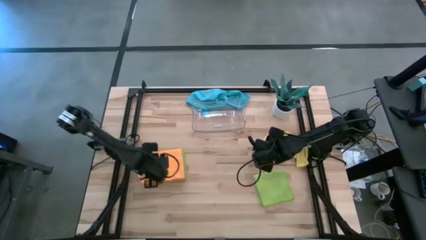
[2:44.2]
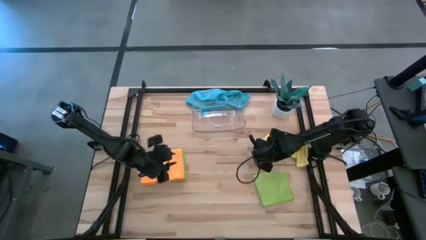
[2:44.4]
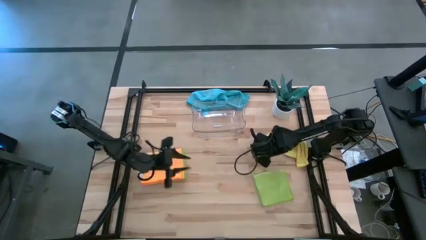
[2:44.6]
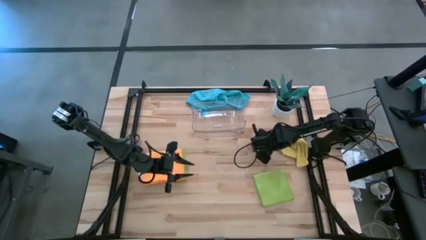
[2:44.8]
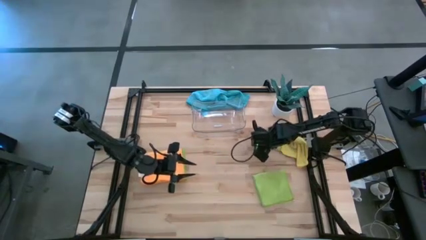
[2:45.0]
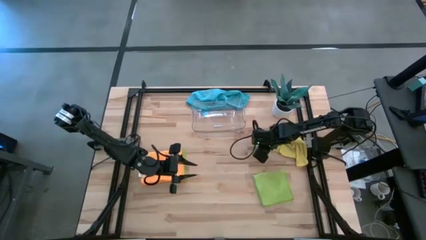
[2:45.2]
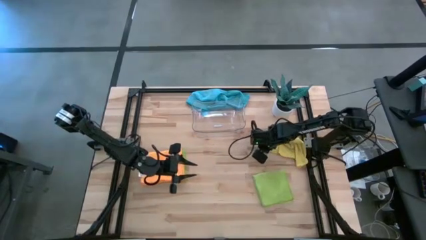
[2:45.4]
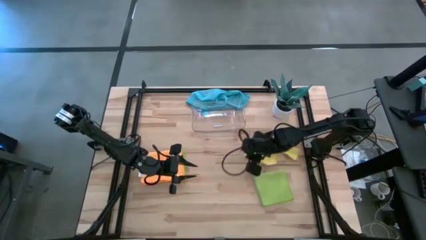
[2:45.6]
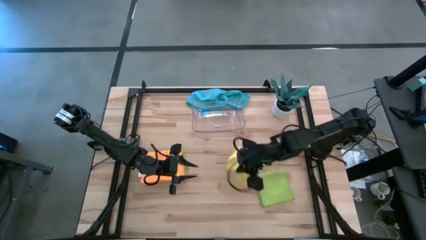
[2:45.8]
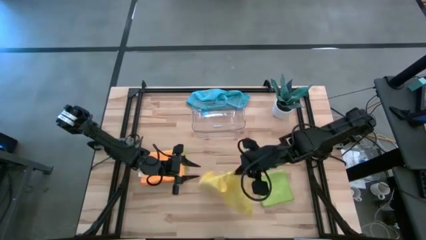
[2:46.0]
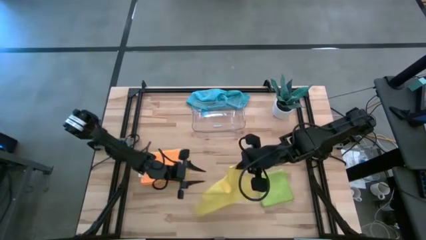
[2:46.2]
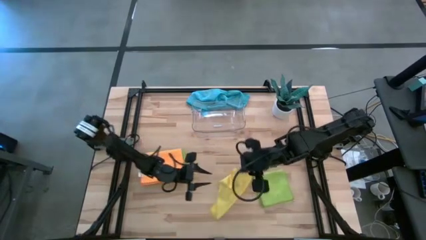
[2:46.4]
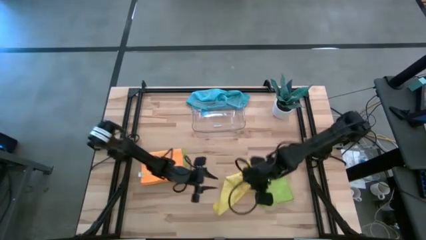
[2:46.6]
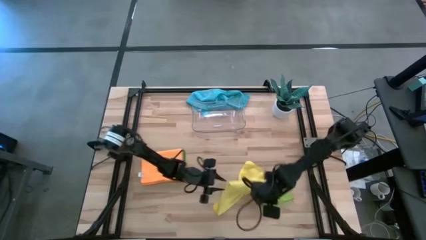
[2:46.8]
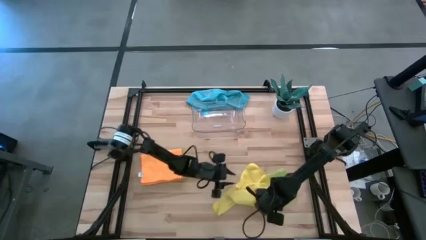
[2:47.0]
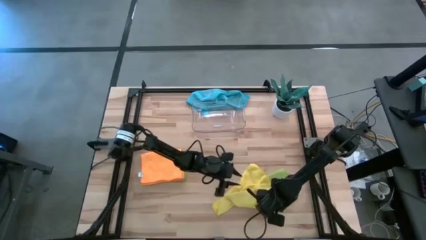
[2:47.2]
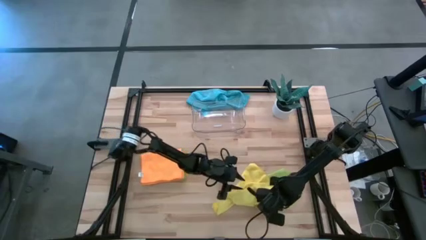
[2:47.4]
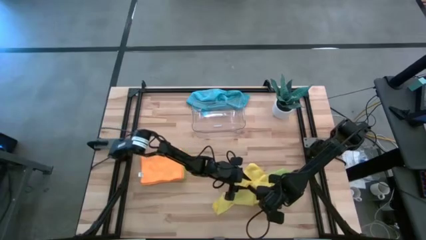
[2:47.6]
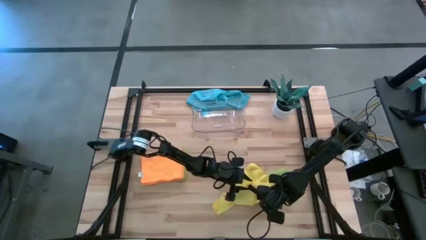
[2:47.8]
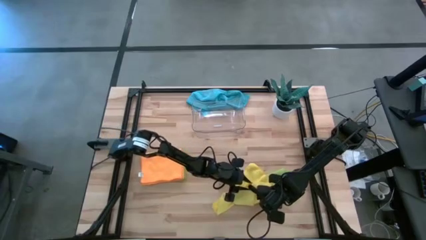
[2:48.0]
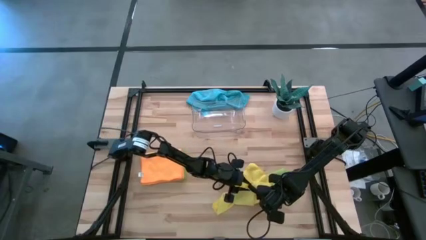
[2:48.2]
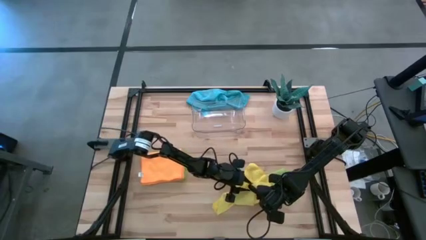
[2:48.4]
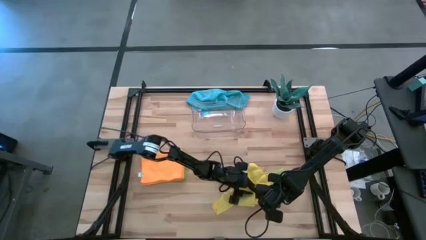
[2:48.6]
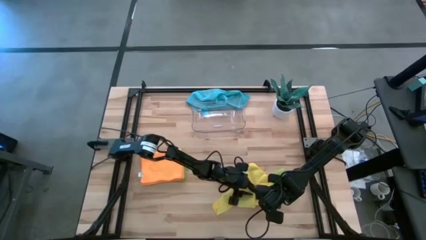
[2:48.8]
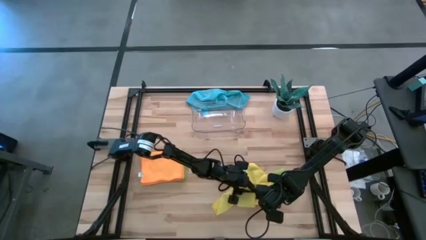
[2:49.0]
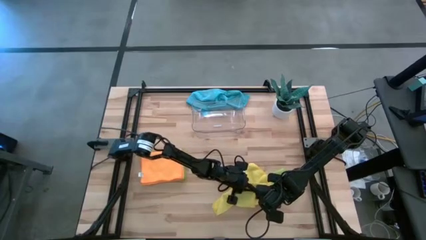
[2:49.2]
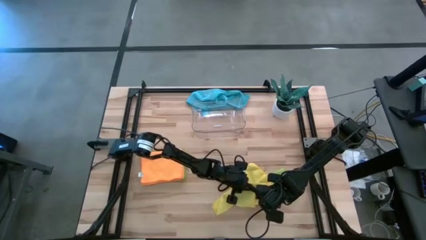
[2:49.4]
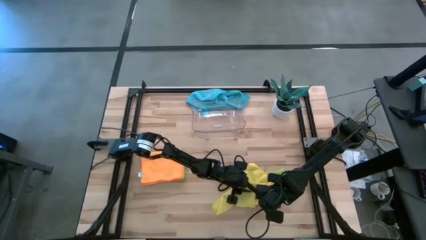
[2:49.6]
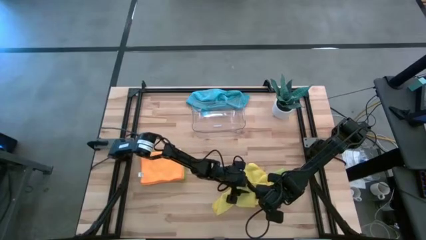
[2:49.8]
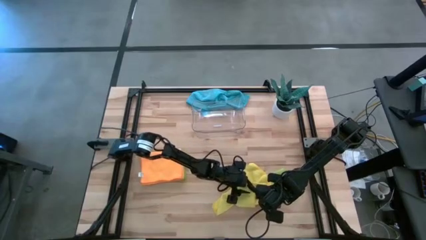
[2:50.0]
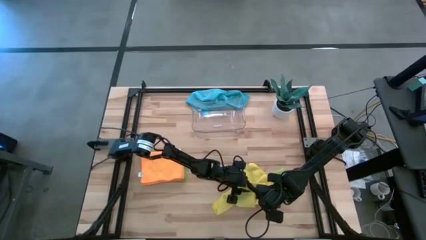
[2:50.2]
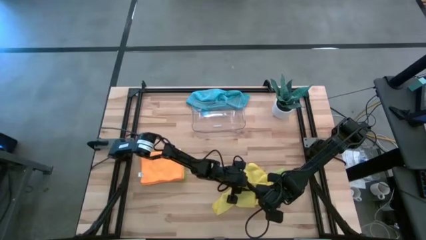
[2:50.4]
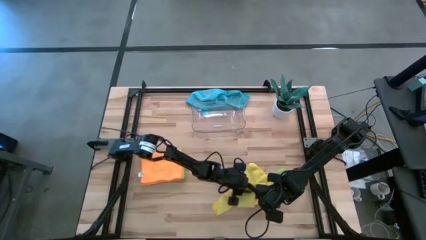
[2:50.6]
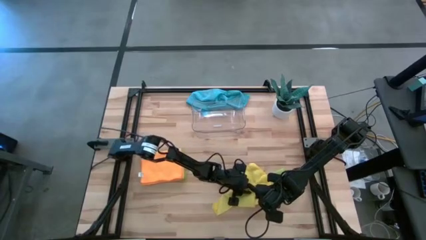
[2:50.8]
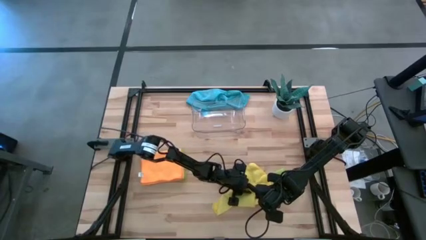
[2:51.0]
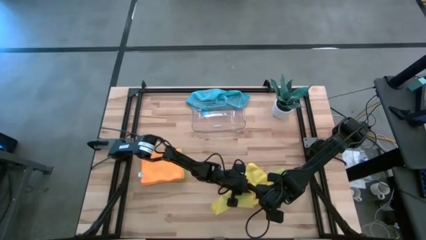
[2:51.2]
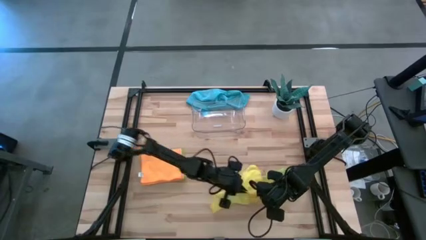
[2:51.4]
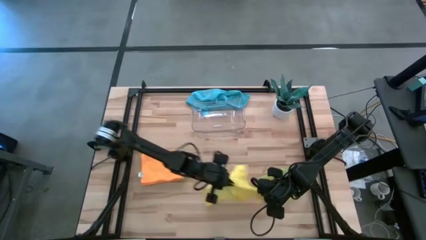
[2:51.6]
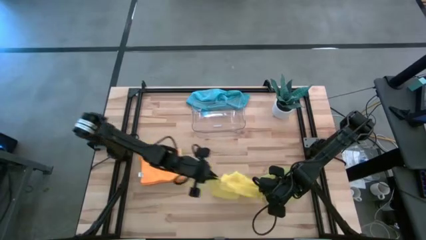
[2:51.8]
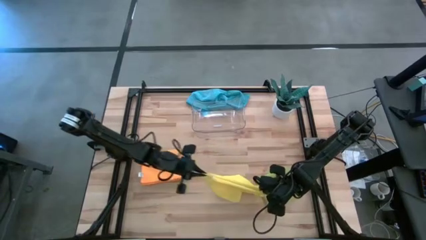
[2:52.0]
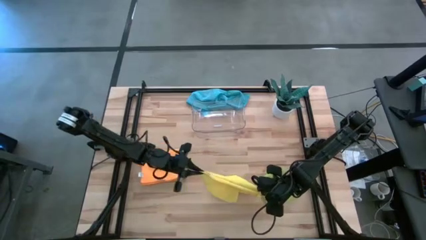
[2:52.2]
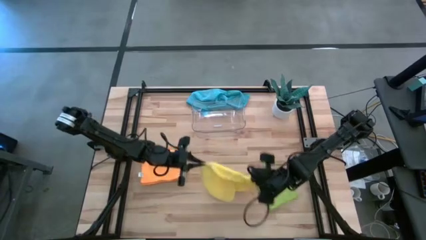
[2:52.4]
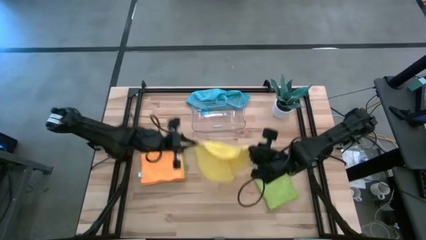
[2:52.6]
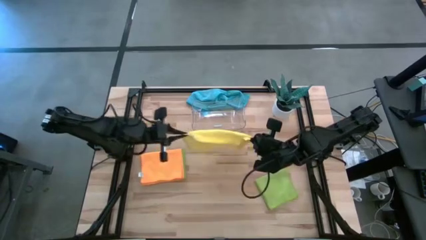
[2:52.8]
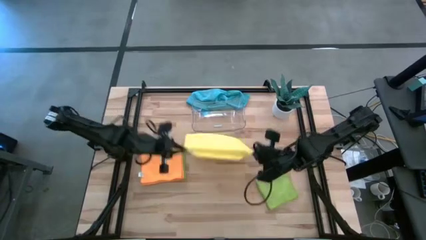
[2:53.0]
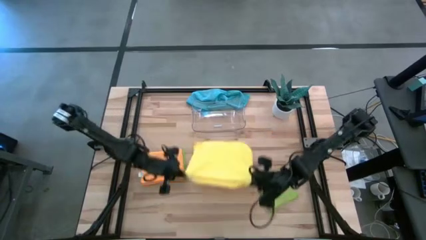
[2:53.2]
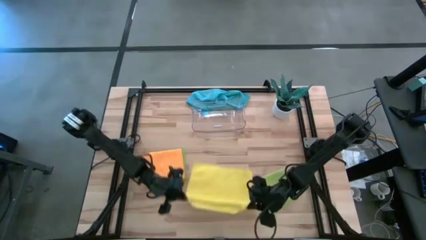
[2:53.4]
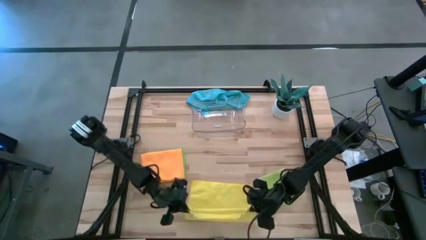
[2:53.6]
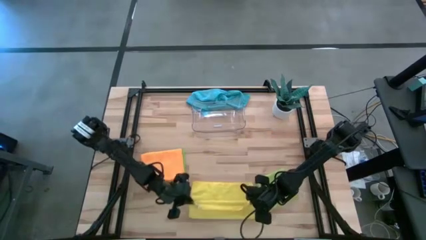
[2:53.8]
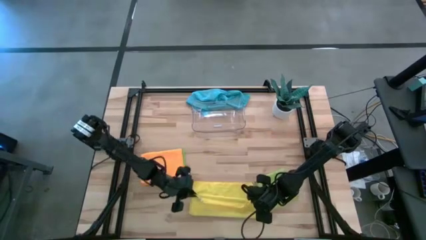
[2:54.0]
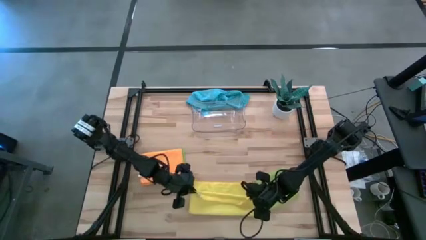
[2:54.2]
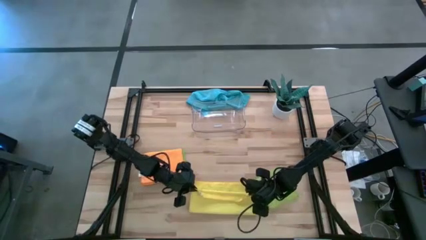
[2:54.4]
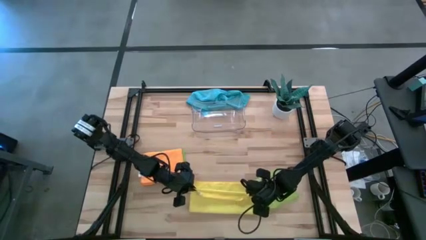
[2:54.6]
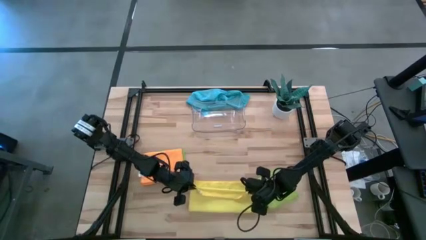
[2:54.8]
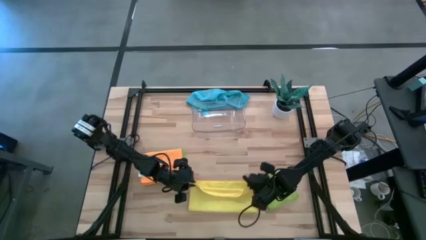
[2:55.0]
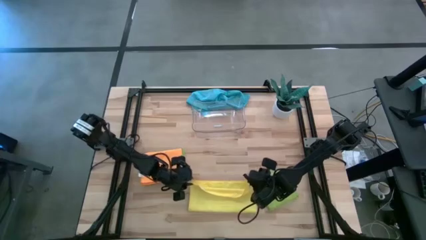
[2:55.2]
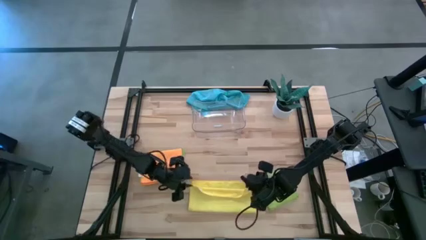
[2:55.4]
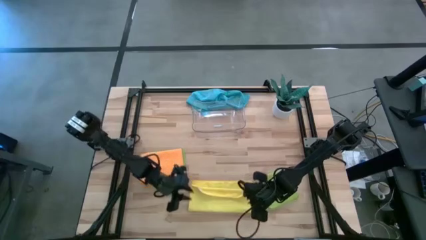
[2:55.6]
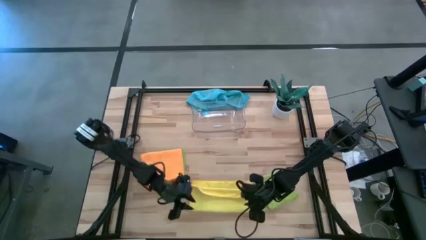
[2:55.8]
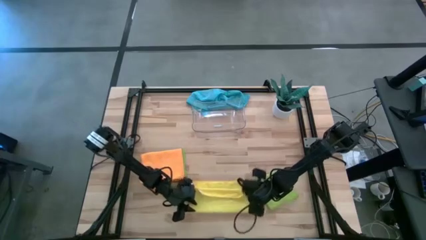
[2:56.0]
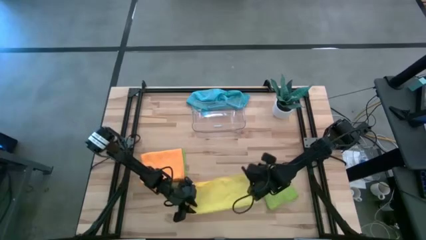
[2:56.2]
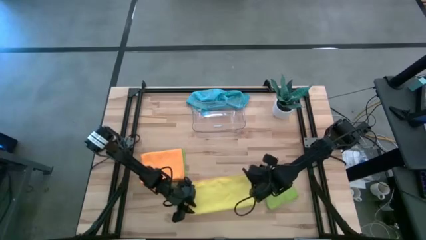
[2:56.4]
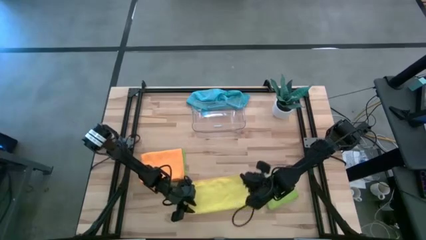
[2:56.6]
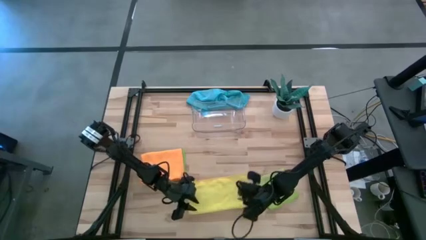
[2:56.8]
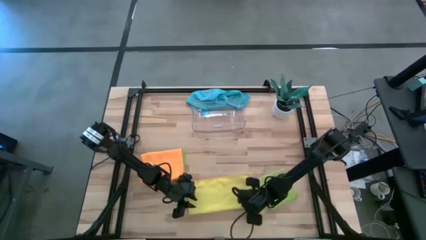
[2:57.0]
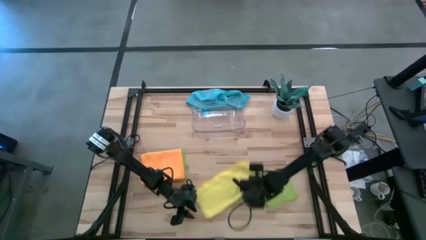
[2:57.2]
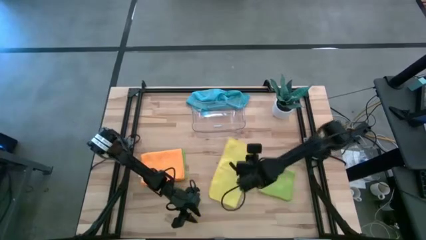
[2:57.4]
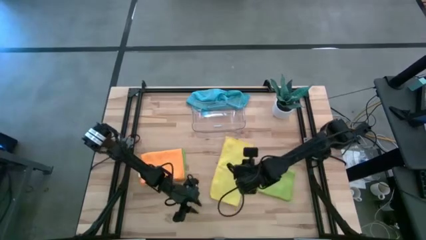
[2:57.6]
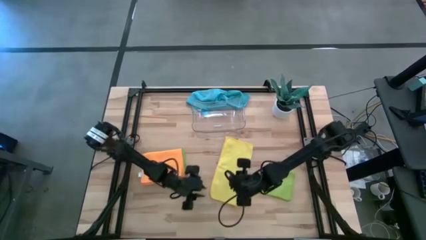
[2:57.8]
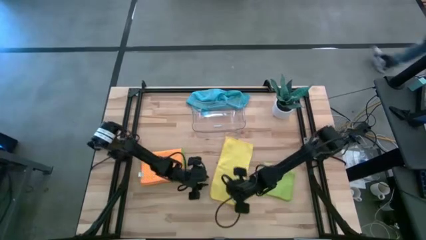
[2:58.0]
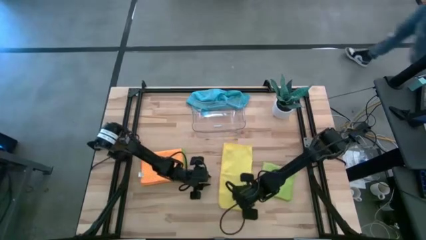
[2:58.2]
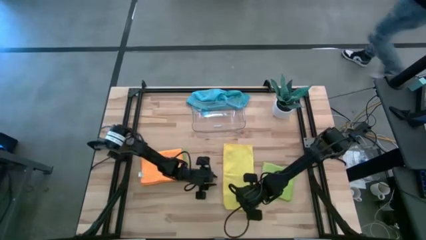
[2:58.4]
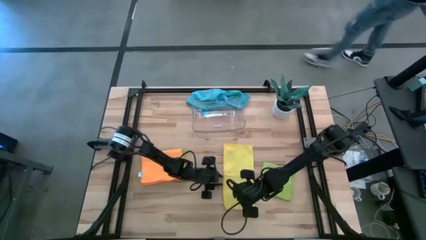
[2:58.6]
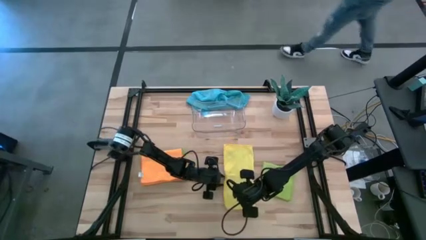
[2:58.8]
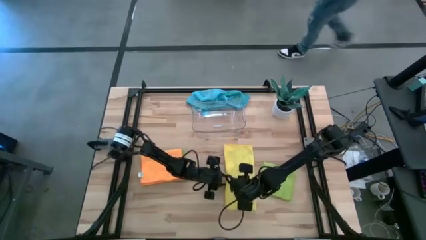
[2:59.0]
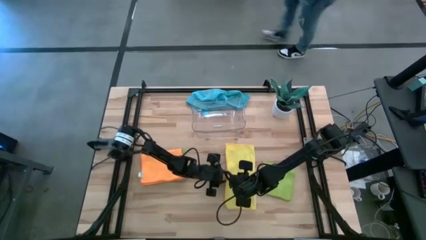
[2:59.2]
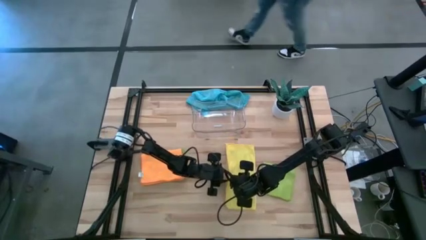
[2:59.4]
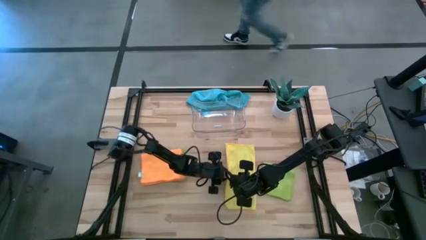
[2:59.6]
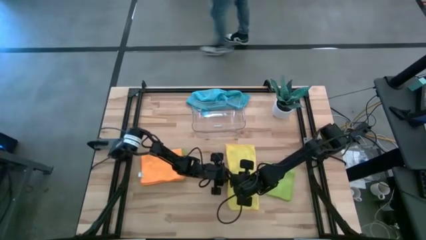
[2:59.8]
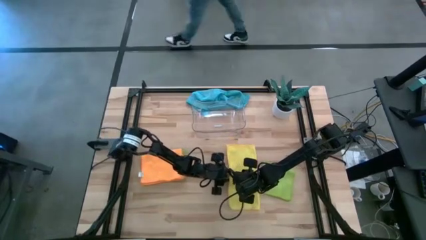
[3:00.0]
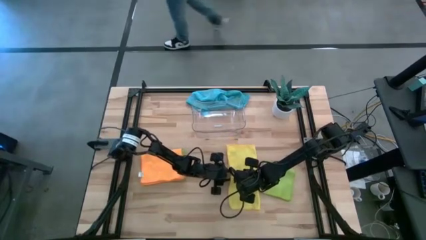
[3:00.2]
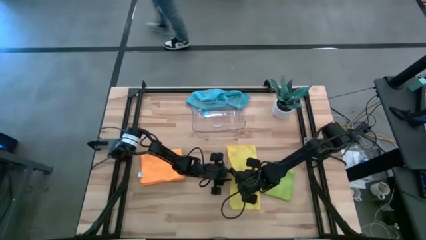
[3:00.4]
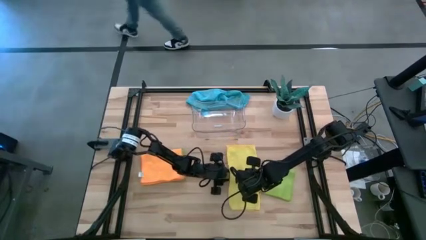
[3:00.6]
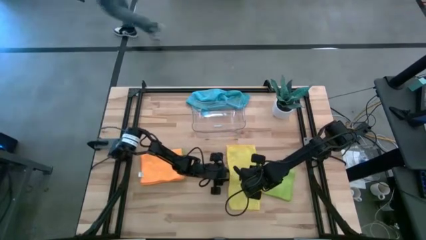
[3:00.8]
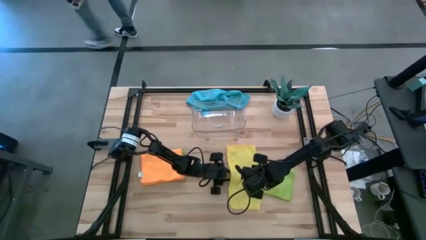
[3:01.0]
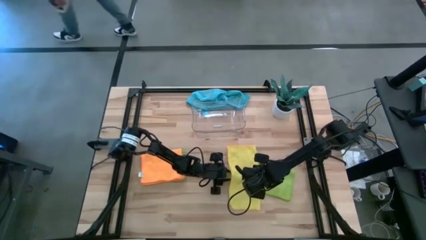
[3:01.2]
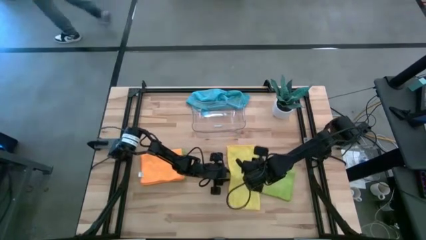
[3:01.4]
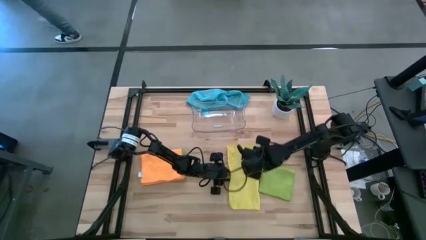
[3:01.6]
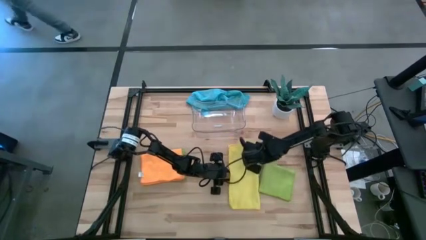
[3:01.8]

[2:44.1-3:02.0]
Task: Fold microfiber towels
Fold the yellow microfiber cloth
